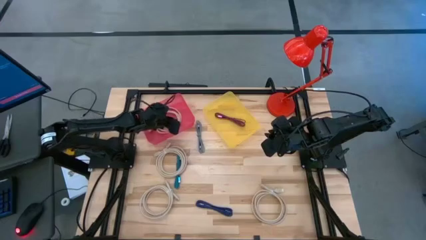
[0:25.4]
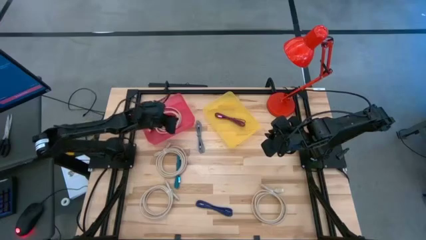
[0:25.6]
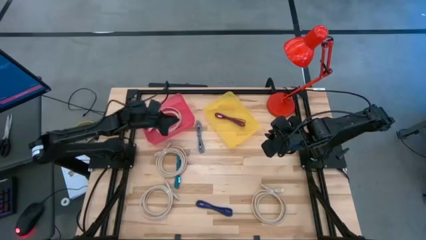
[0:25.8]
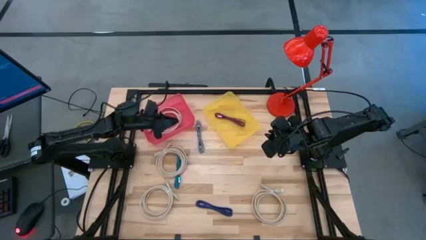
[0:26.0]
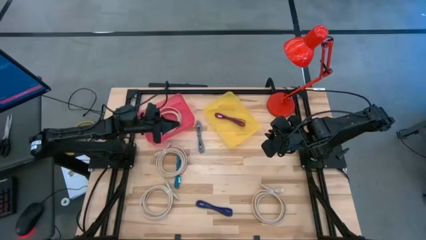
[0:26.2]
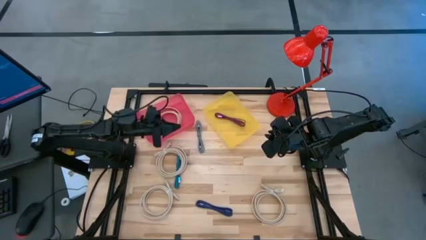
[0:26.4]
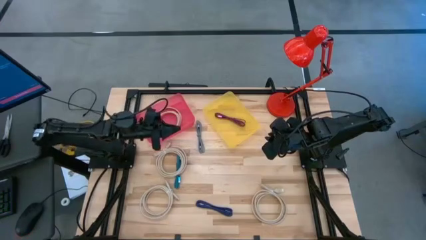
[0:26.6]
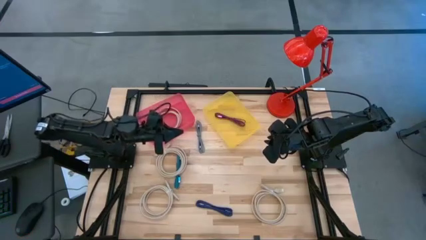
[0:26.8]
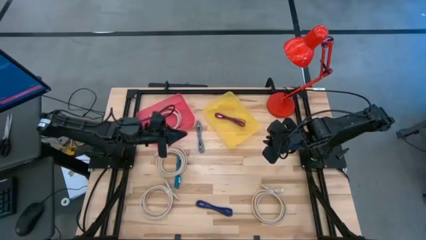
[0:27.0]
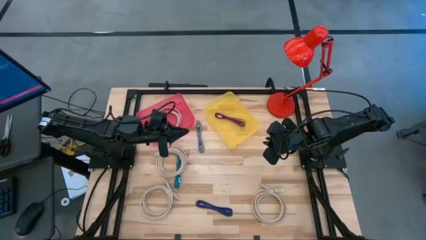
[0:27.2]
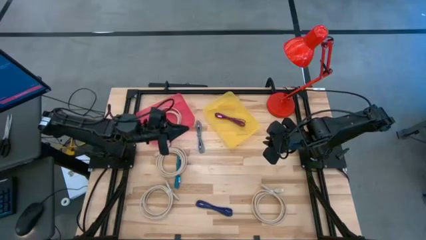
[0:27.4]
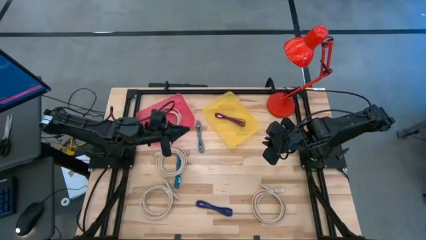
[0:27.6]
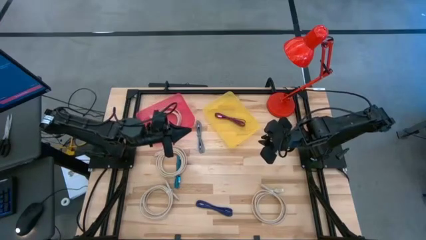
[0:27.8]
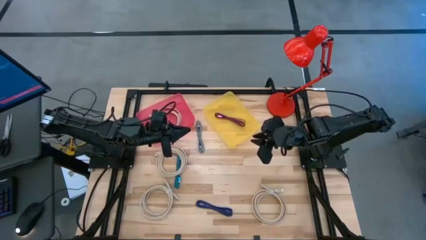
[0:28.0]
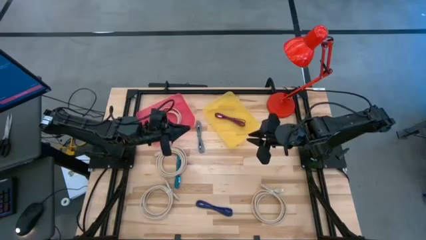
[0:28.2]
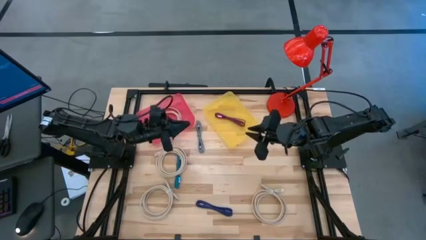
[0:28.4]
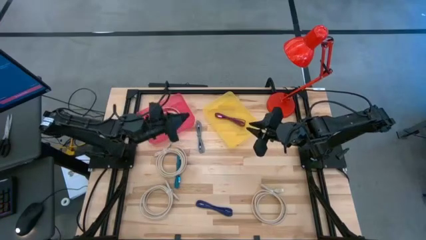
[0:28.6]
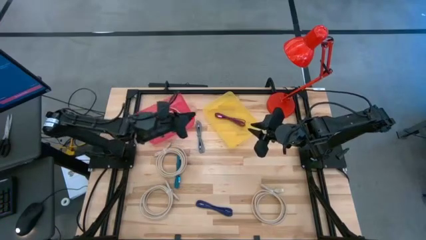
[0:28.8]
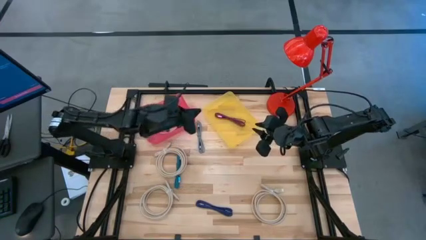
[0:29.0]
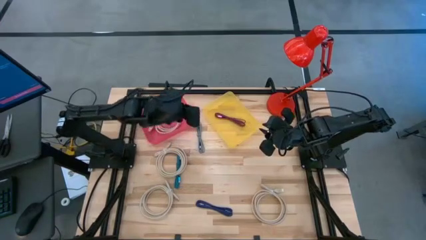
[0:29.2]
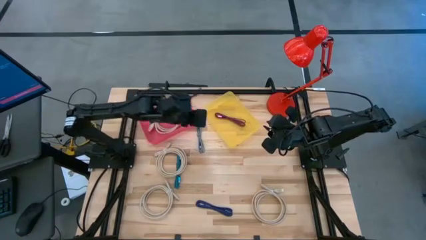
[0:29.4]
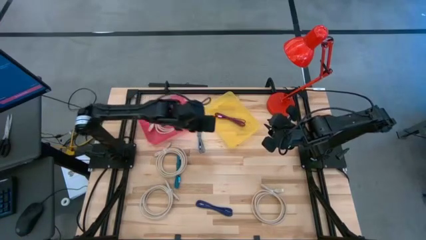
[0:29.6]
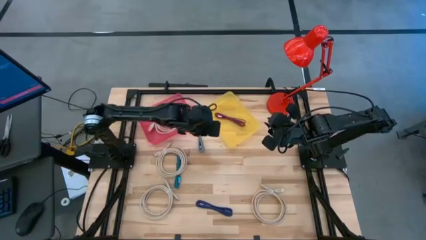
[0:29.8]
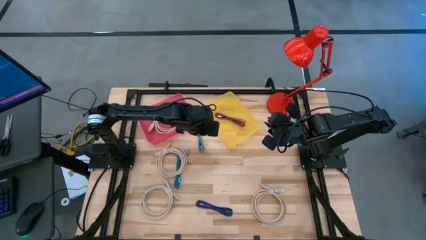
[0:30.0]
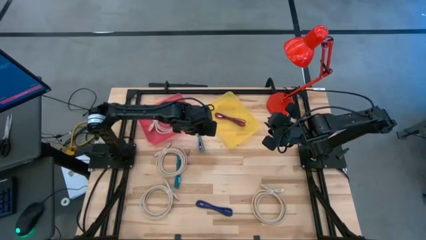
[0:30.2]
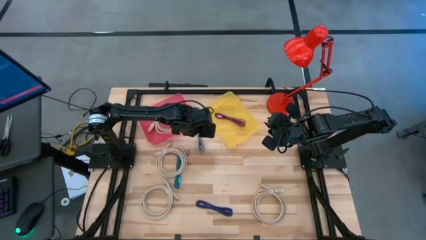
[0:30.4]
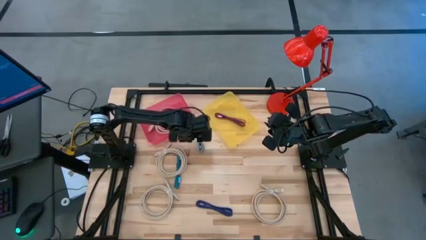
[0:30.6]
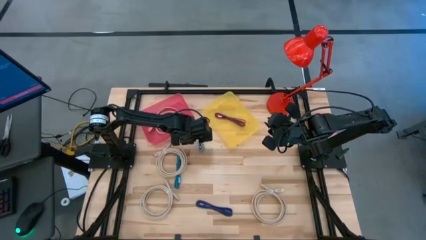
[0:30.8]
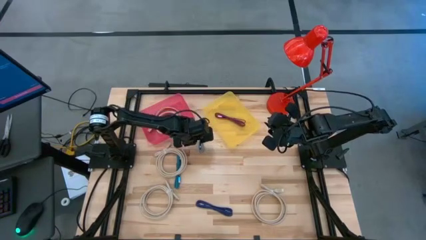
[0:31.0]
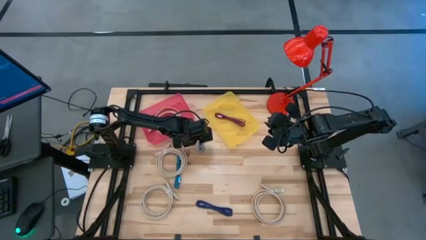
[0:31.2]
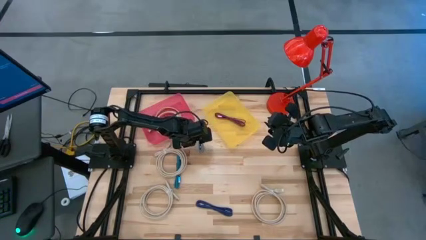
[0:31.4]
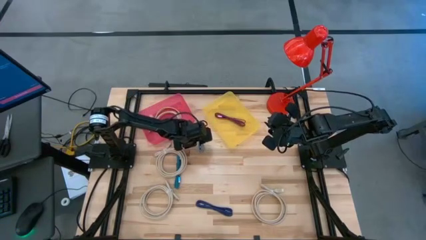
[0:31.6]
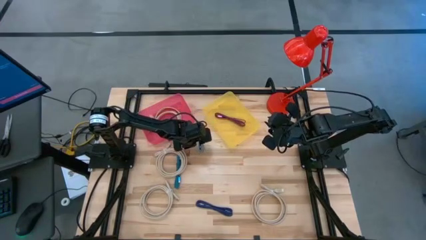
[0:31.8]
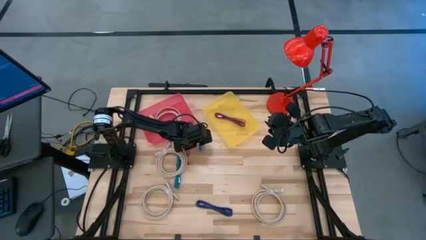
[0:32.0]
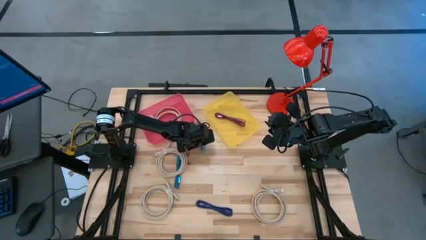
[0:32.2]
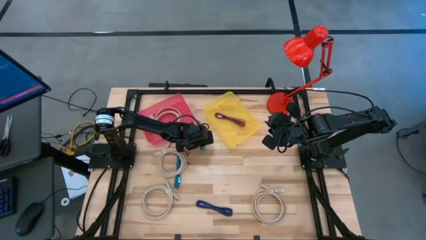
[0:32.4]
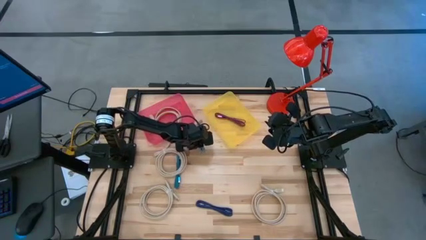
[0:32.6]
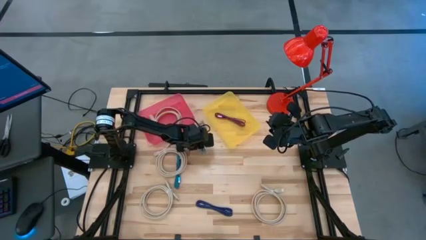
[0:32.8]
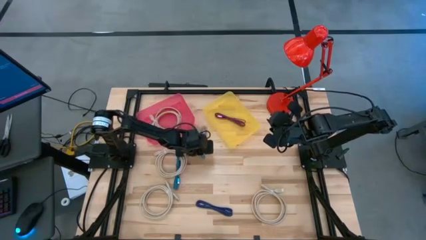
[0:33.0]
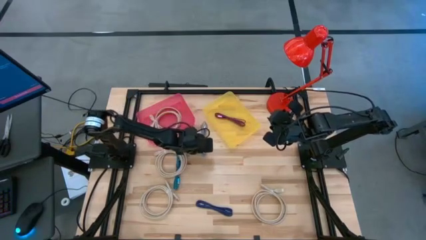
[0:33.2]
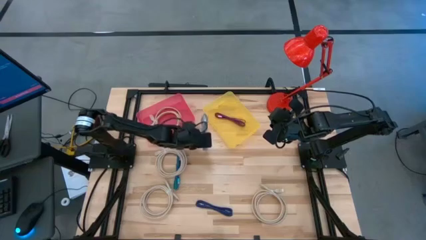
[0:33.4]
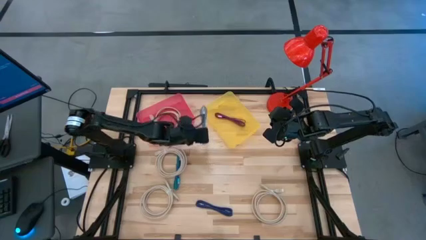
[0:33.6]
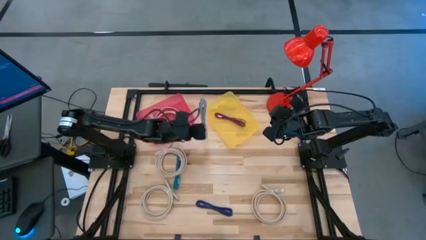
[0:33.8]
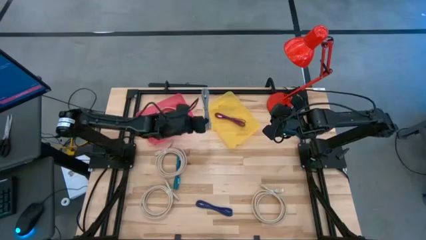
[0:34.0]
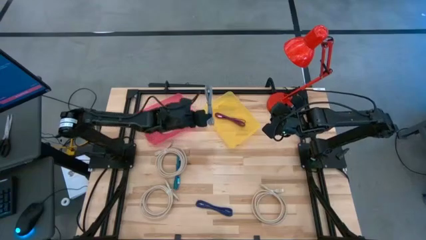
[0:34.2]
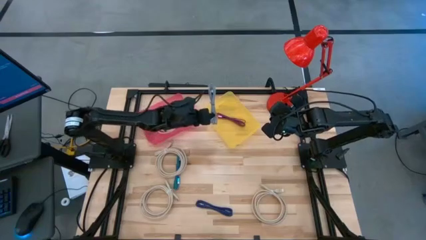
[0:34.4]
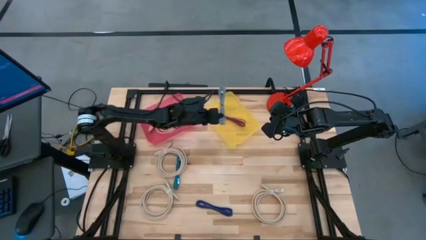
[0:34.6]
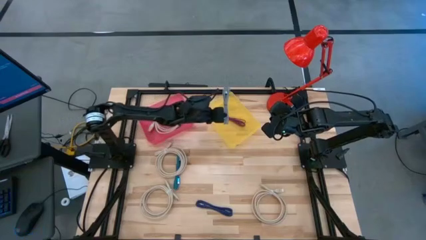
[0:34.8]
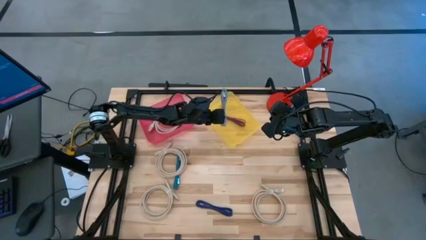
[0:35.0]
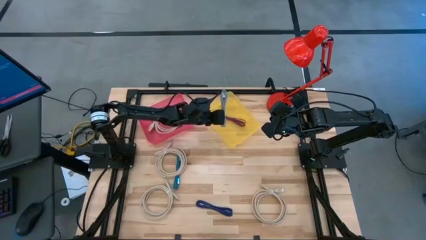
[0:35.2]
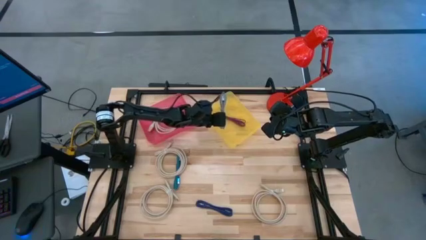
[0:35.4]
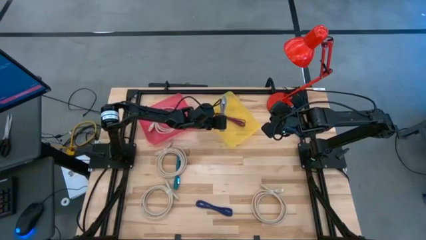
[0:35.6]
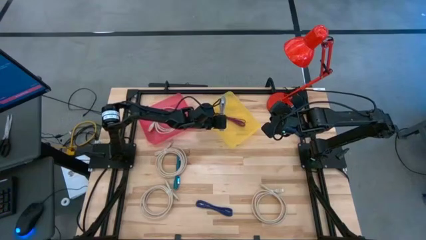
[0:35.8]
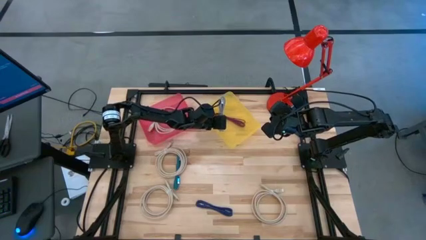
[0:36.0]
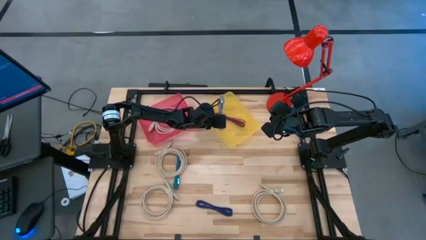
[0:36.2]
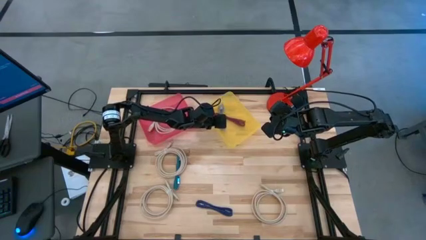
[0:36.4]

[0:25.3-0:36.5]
Task: Pick & Place USB Port
Put the black charger cable into the yellow transparent bin

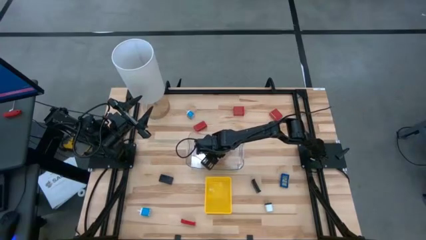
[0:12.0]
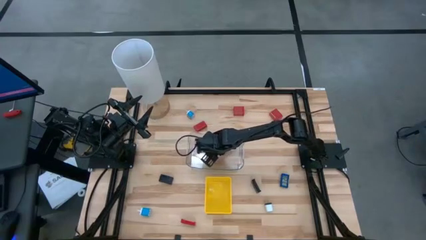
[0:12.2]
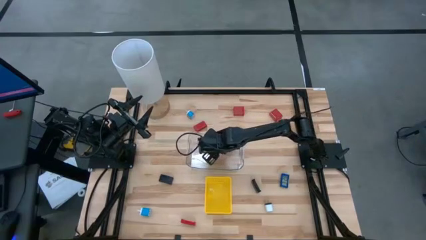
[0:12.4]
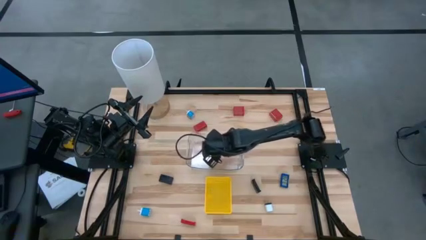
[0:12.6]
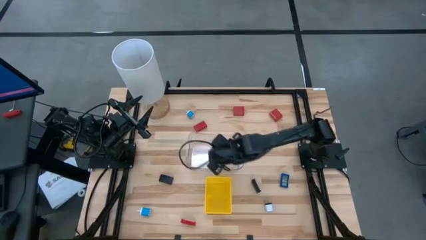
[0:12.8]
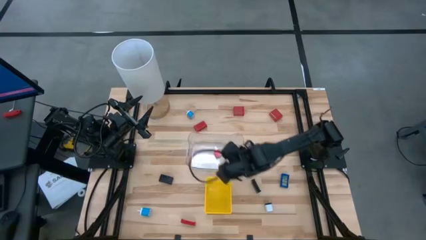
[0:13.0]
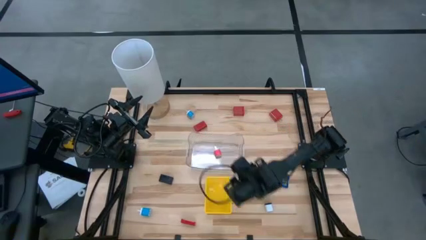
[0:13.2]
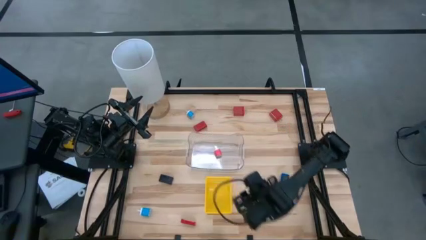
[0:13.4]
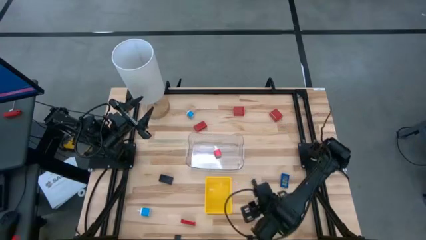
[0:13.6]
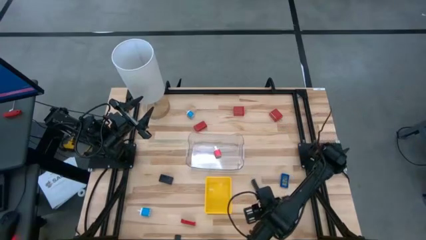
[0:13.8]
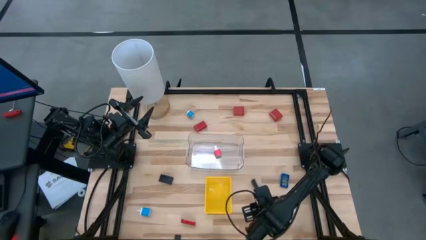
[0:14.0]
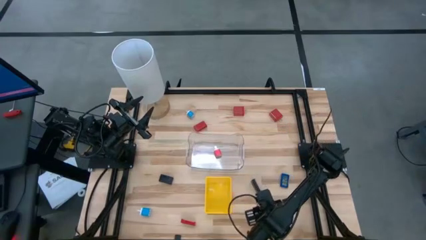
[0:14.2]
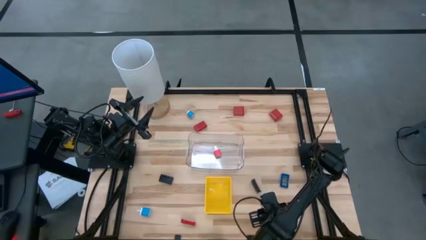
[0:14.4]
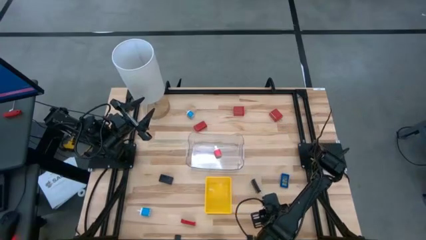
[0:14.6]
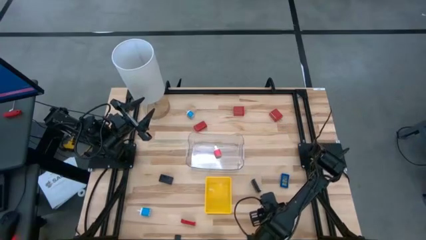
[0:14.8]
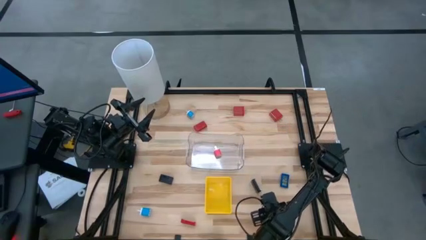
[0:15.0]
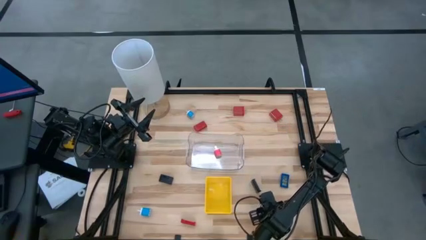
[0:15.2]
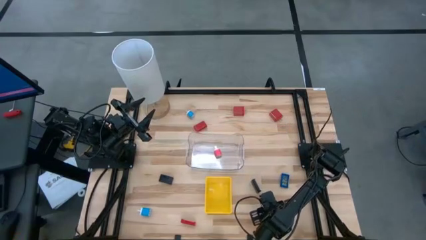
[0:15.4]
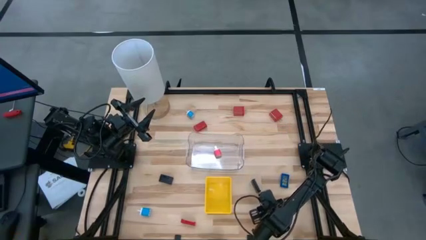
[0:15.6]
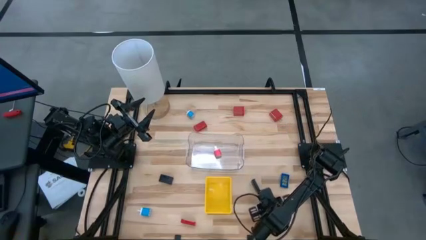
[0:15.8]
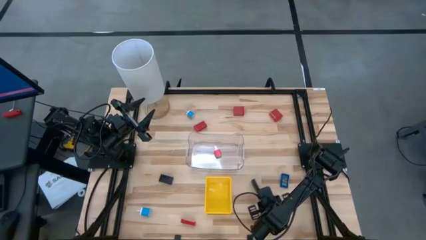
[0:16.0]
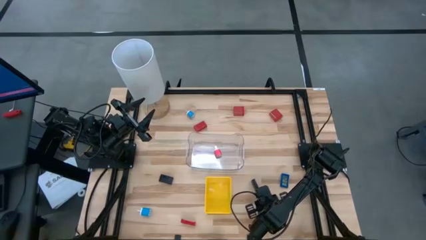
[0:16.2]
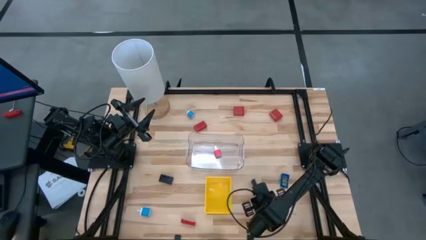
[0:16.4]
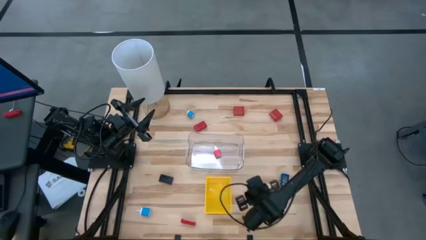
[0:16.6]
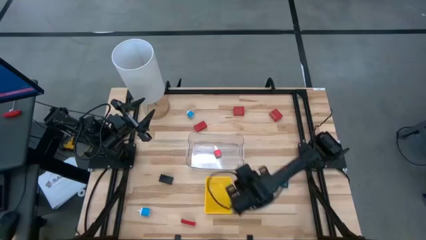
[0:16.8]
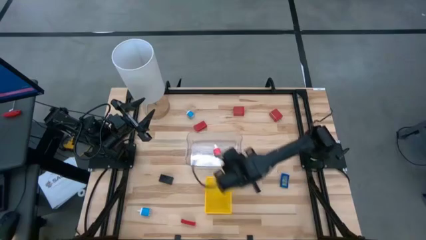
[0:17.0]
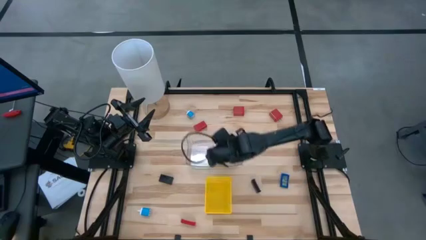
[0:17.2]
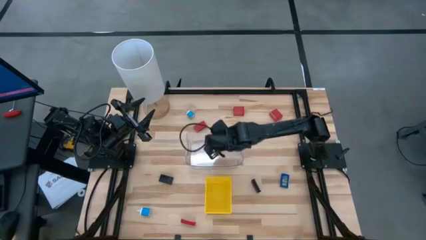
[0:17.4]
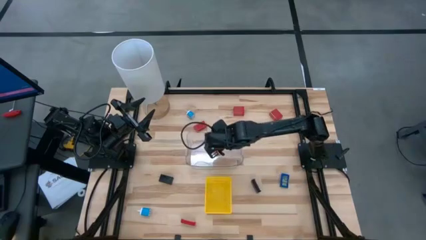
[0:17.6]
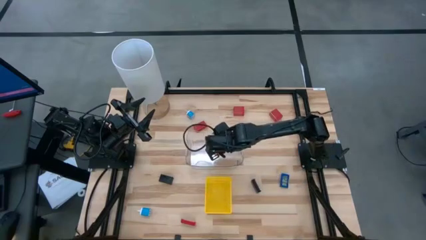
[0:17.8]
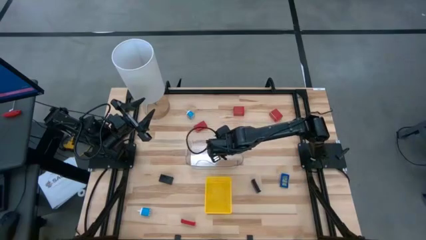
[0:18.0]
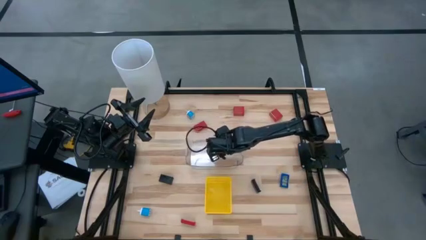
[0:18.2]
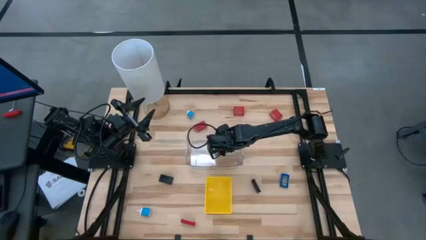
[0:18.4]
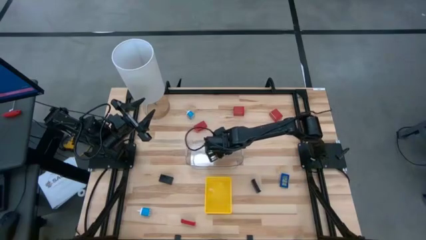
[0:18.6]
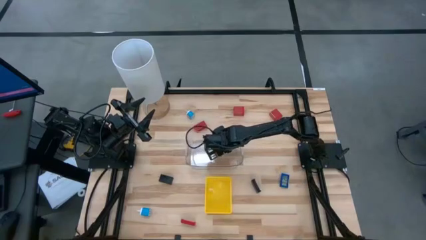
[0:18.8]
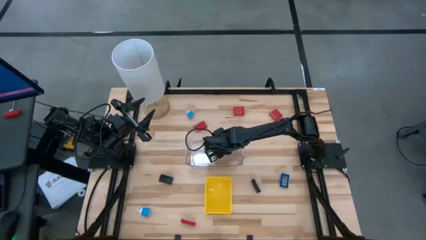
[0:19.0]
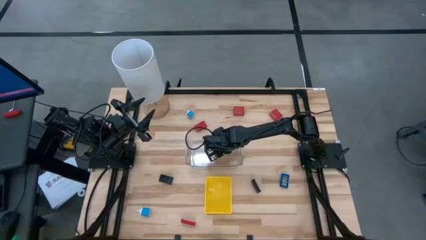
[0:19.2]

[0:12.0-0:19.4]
Task: Pick & Place Office items
Put the white charger adapter into the transparent bin
